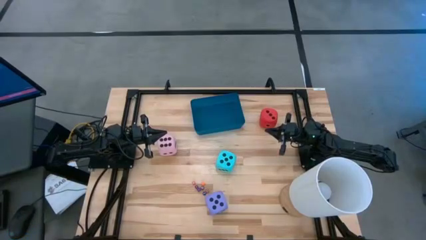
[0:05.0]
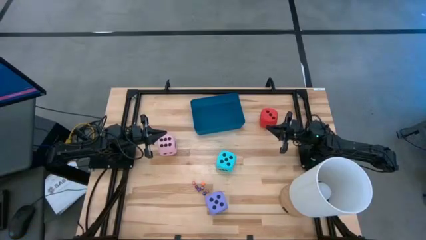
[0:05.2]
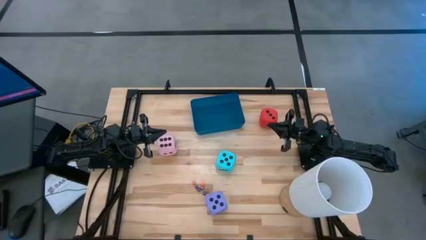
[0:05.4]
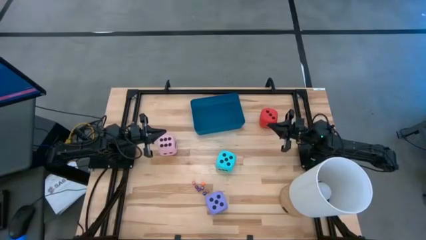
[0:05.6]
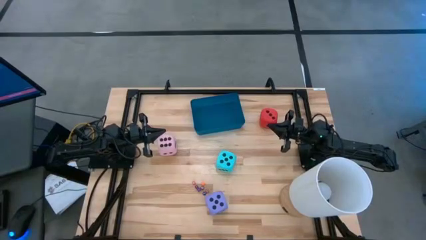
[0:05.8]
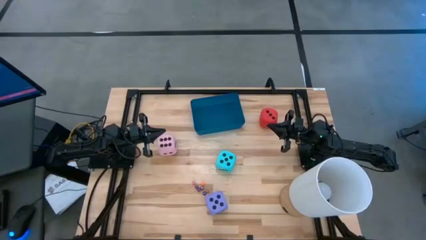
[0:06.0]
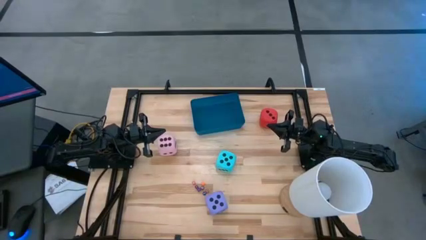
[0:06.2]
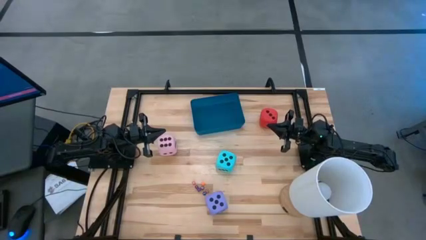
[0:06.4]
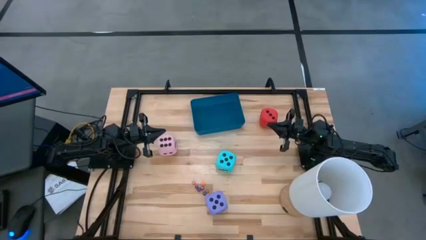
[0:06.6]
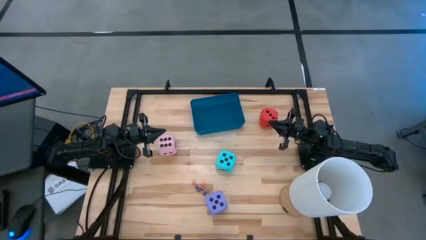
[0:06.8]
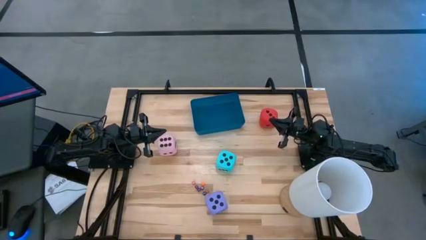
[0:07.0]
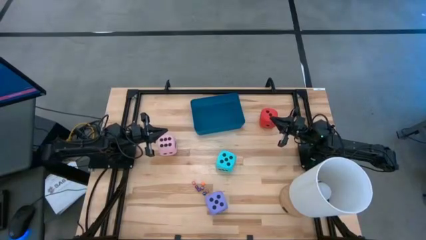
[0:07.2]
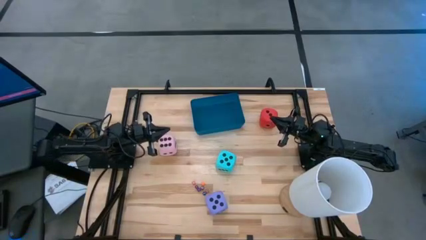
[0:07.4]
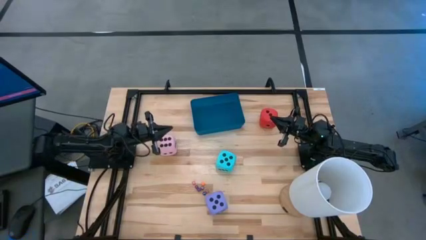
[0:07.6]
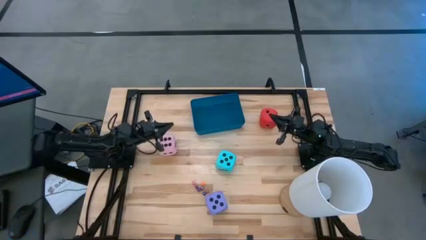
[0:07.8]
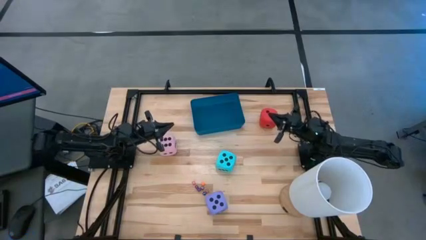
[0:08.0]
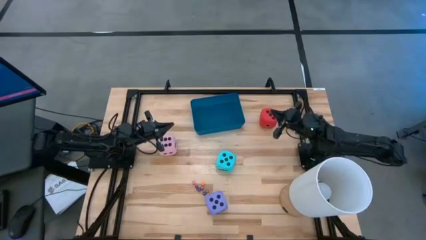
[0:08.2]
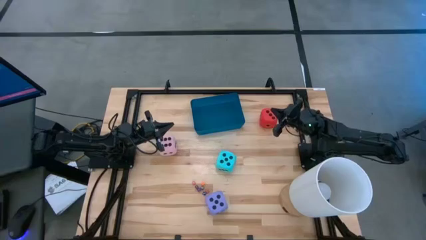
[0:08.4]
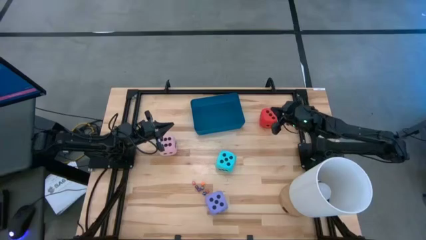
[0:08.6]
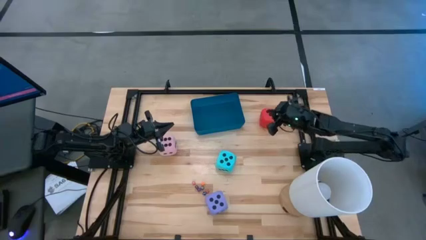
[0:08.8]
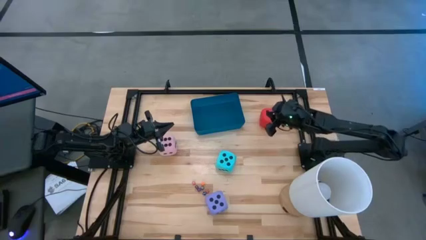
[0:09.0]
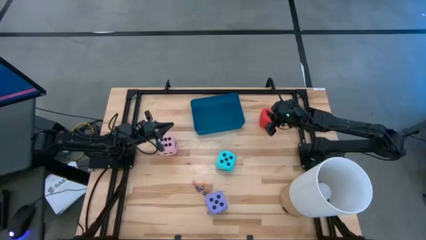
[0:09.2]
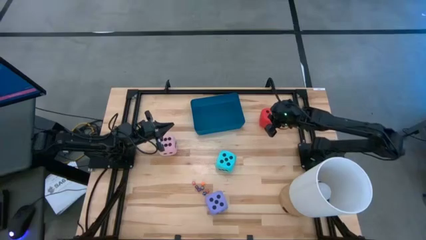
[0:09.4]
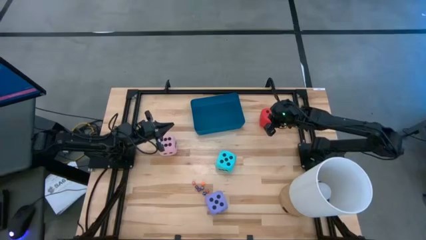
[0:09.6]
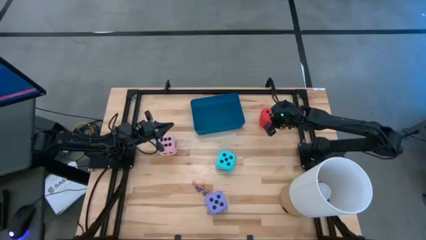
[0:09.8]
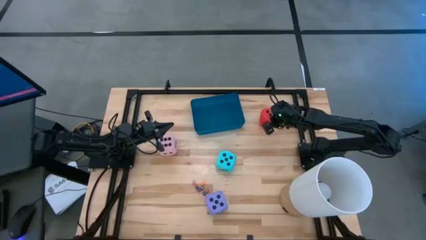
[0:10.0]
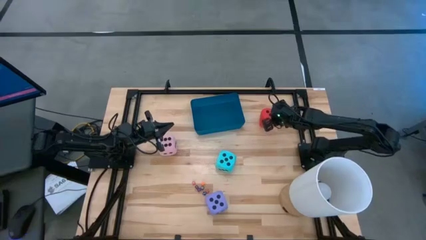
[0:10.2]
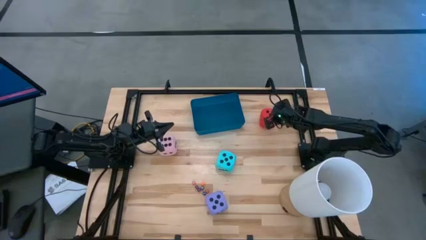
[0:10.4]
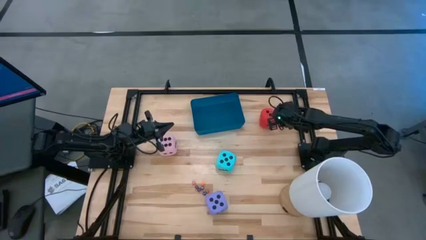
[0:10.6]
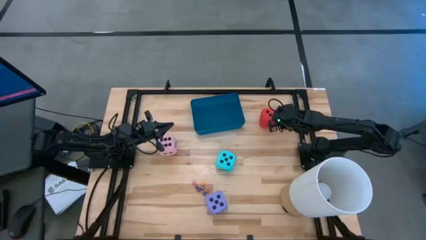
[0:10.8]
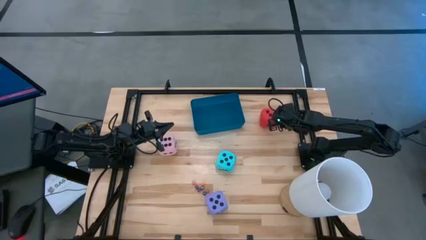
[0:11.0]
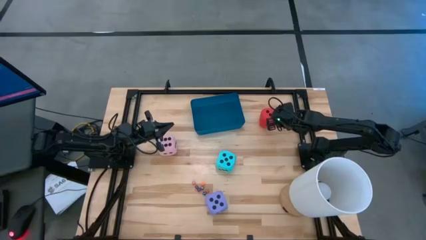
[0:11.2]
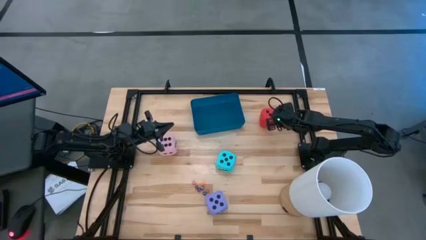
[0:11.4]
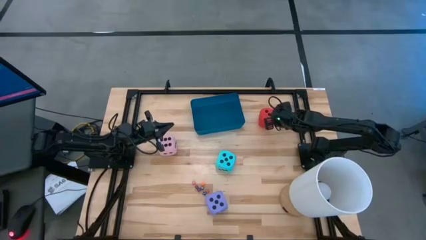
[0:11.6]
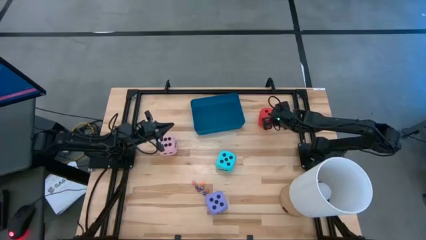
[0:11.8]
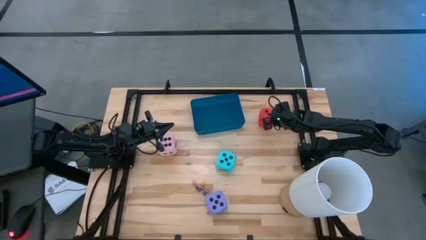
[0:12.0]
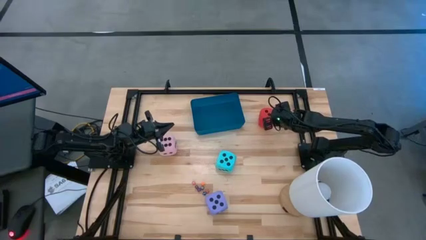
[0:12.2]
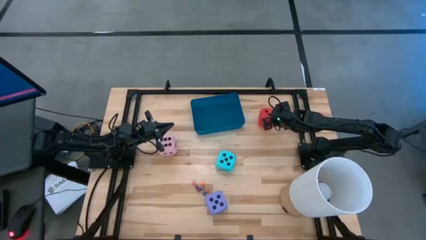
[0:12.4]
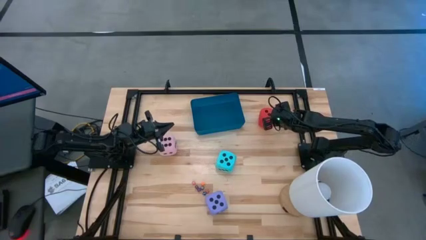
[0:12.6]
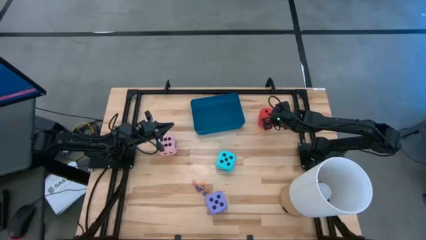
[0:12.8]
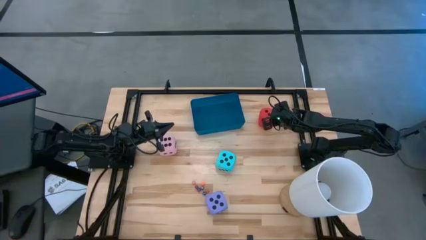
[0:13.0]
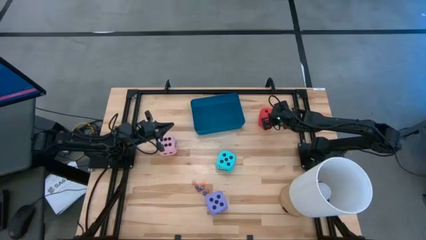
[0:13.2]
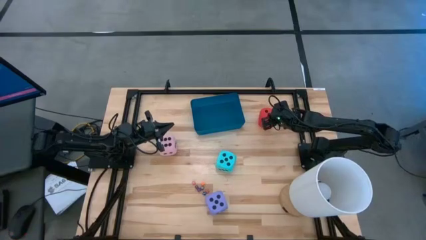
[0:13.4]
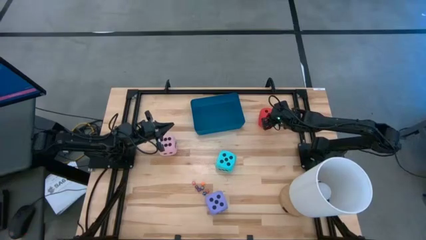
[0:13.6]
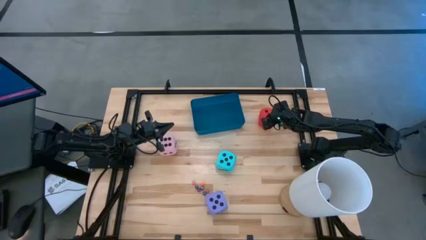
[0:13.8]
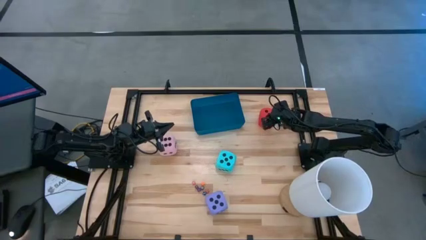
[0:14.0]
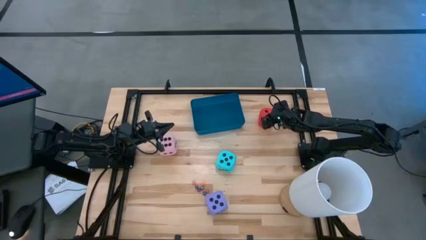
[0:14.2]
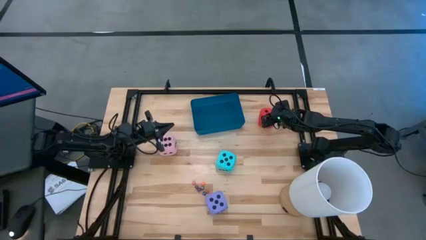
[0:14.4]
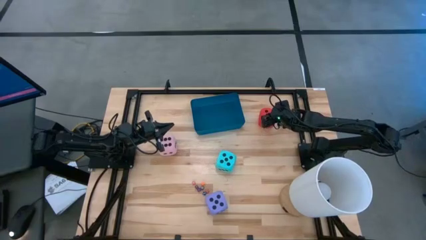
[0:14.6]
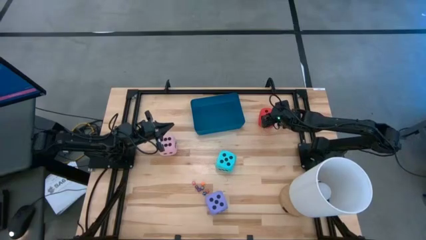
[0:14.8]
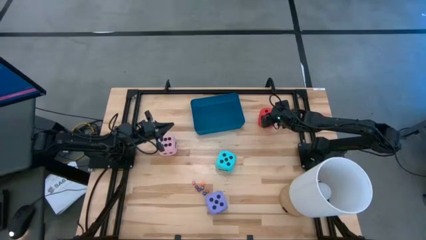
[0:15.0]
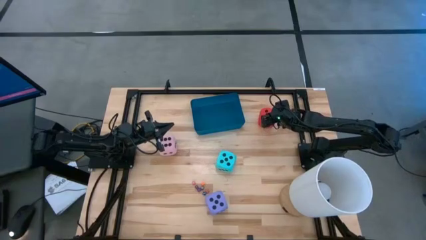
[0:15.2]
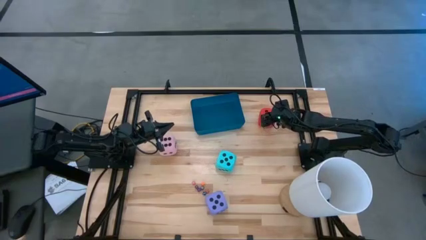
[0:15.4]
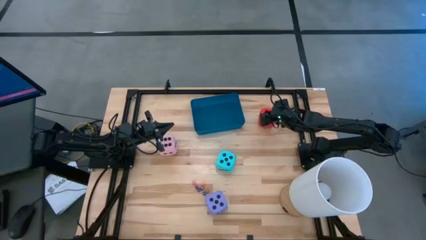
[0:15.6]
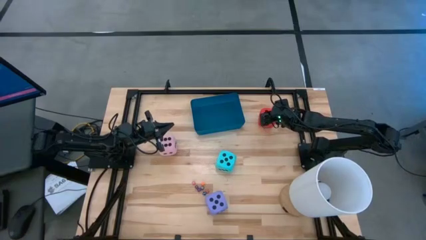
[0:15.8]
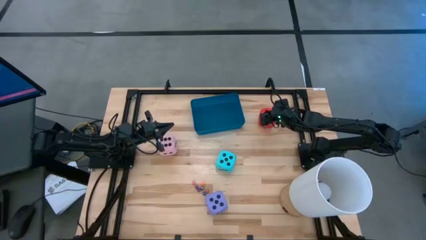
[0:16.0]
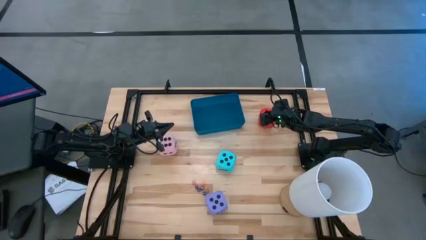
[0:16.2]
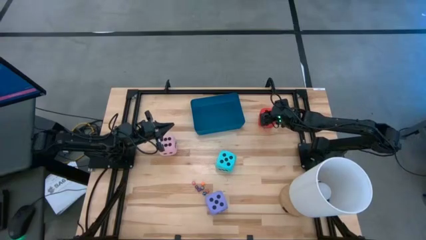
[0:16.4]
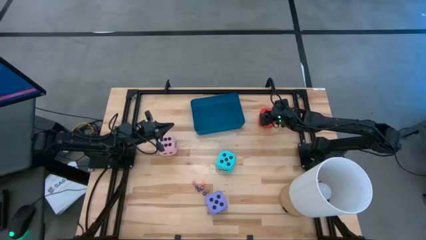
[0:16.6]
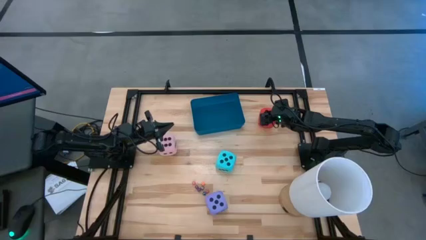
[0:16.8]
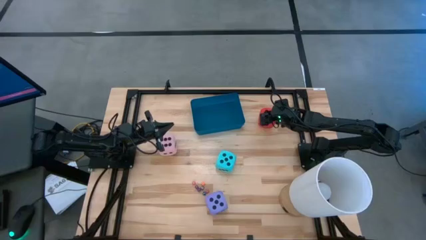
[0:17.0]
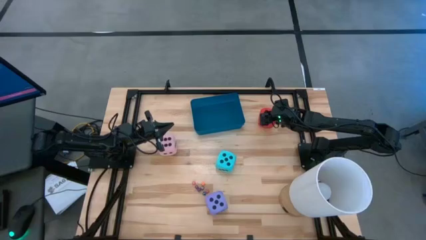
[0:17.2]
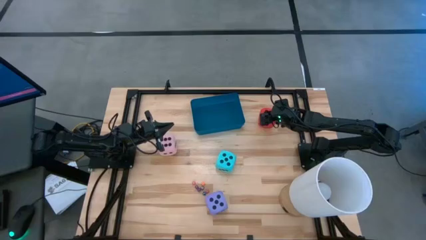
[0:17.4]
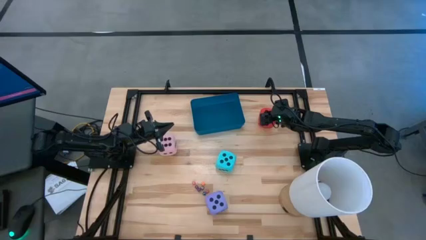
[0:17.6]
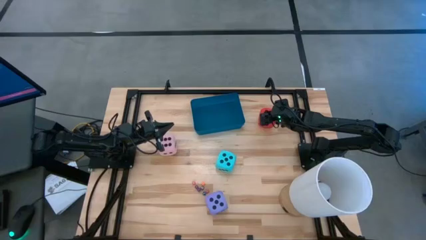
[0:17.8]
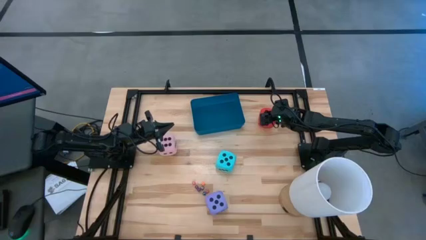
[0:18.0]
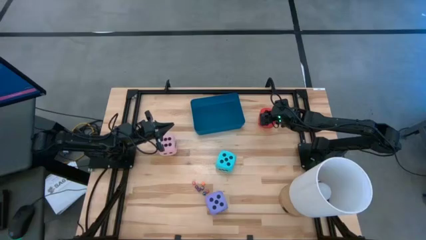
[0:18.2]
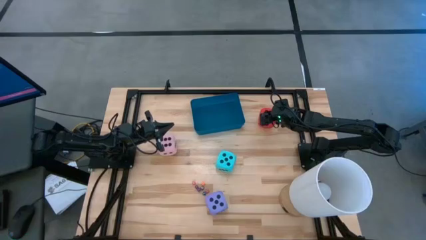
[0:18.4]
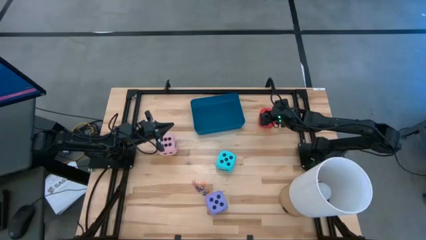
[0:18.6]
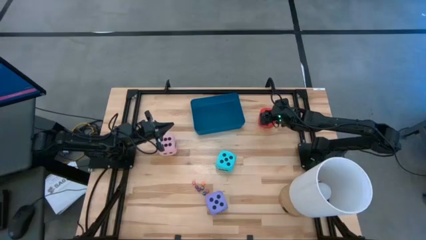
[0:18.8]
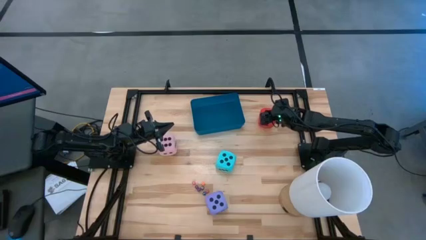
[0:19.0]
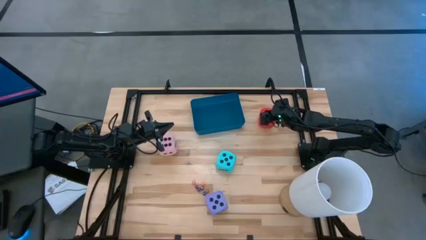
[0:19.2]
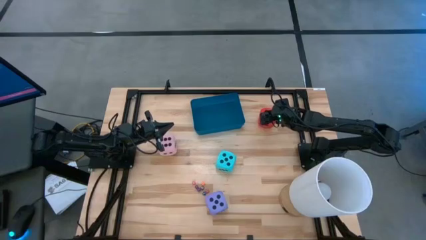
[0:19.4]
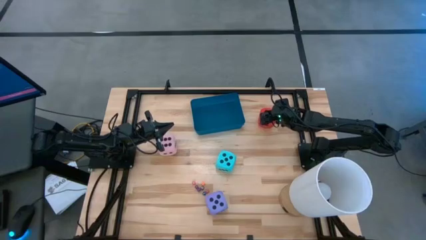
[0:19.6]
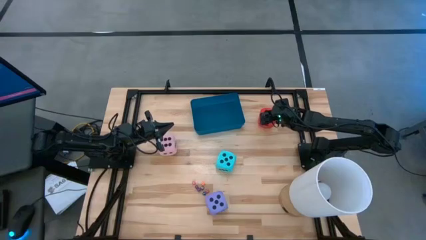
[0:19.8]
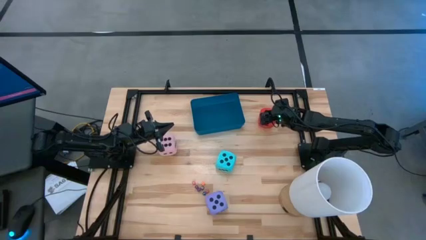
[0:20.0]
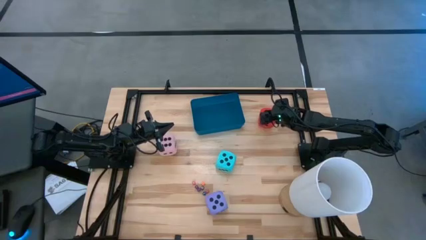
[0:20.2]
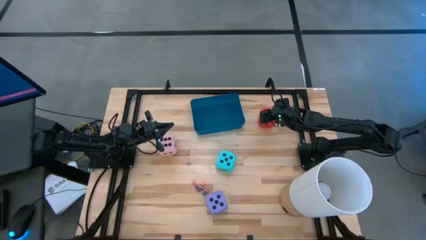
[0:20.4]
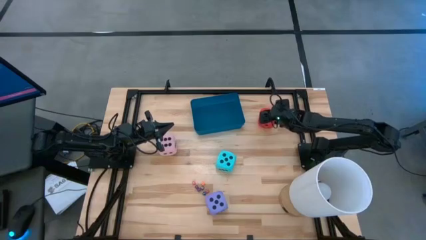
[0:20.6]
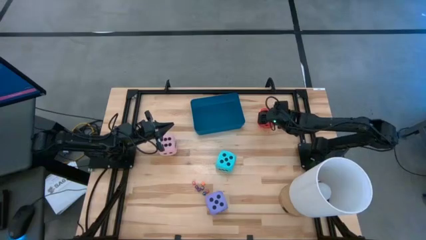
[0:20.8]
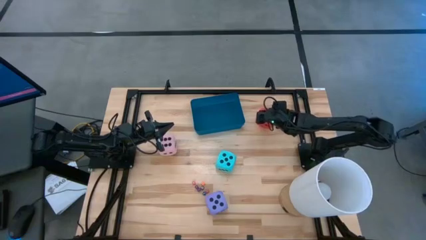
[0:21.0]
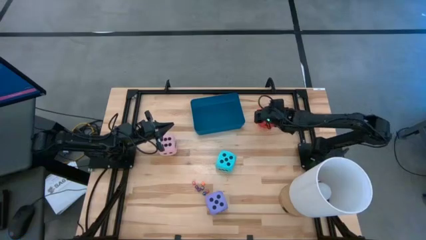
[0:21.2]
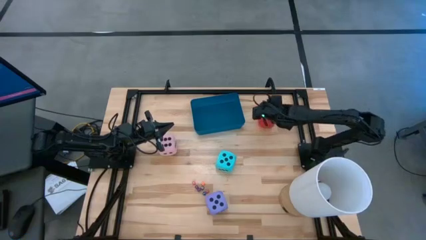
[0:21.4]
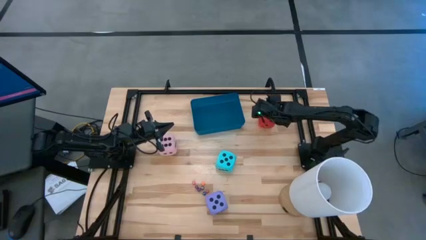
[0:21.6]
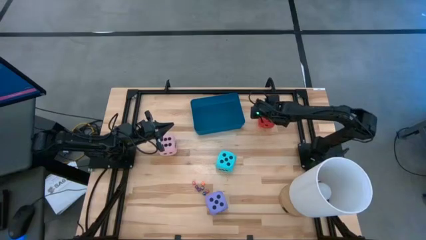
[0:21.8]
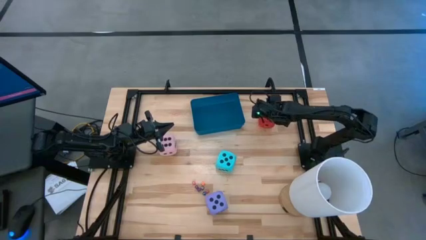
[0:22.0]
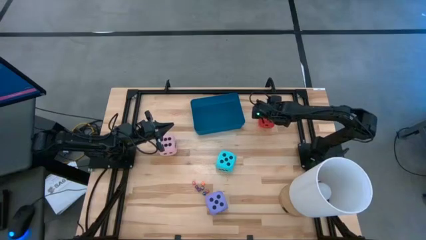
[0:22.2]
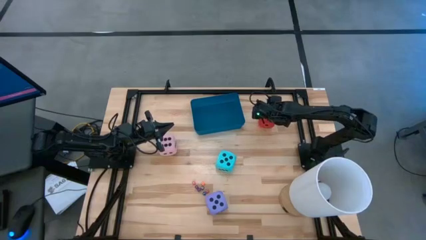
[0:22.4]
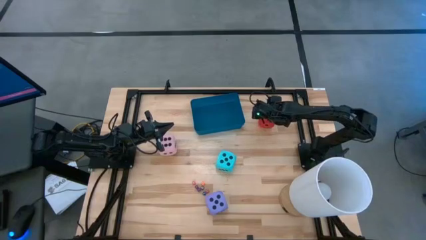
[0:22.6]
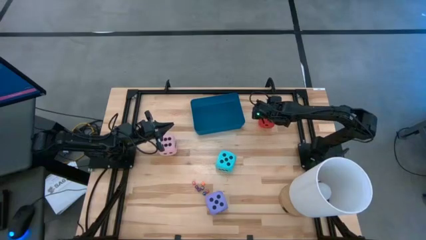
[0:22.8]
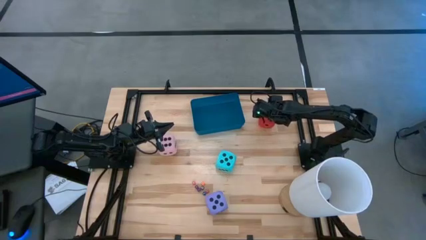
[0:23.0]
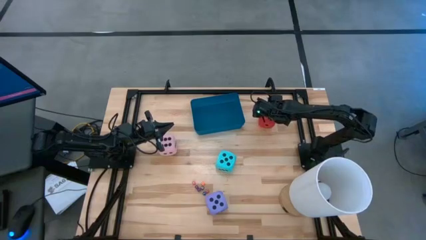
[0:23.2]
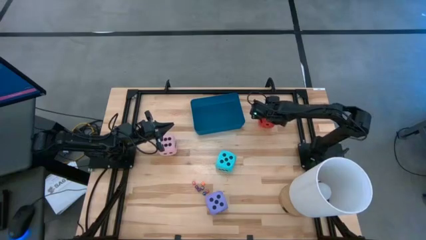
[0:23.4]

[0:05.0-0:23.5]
Task: Pick & Place Dice
Put the large red dice into the blue bin
